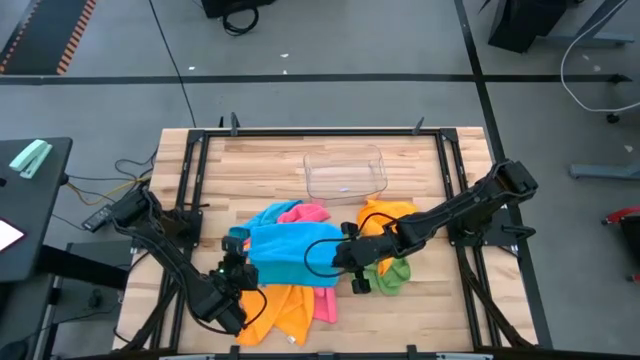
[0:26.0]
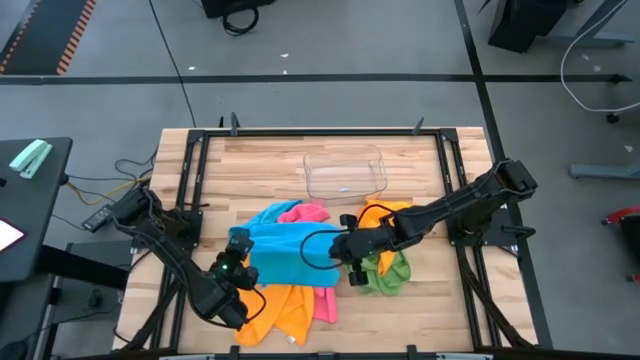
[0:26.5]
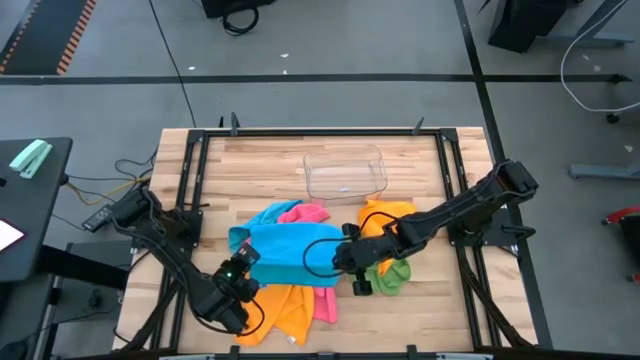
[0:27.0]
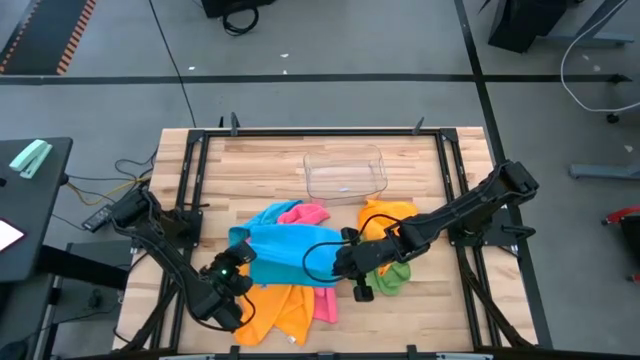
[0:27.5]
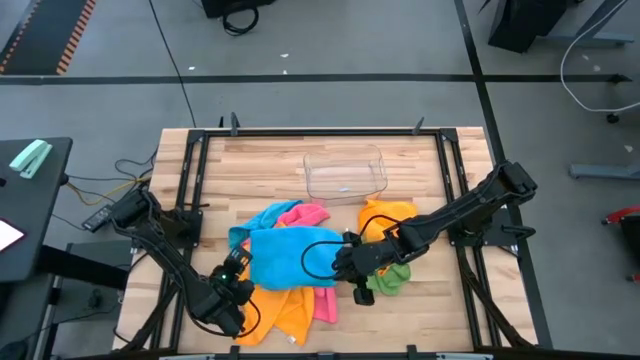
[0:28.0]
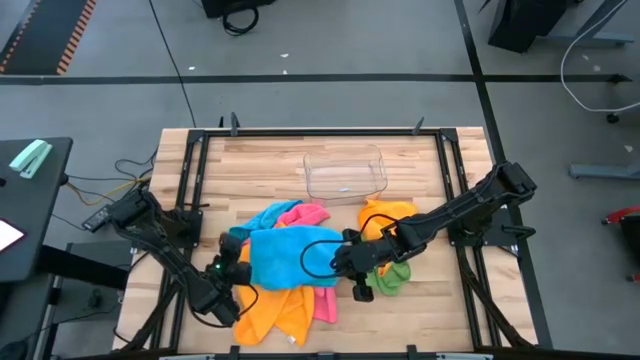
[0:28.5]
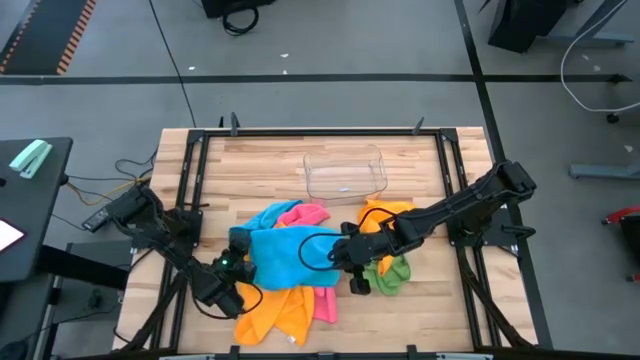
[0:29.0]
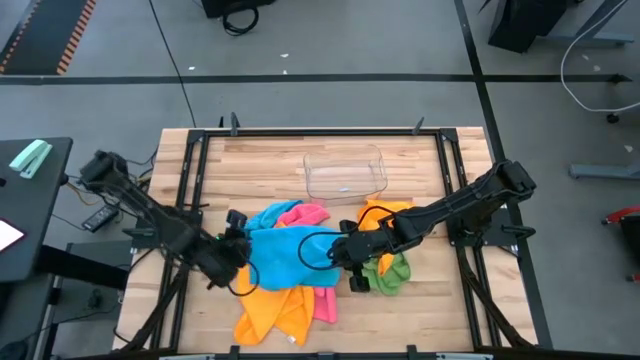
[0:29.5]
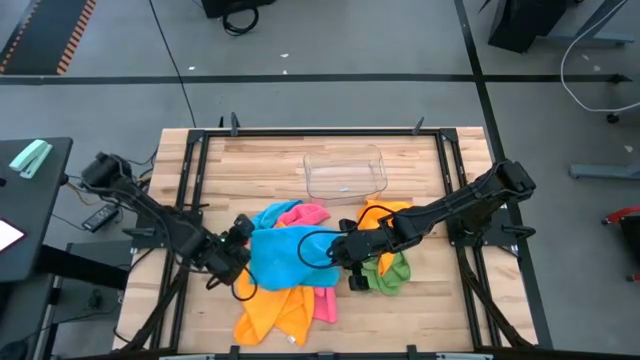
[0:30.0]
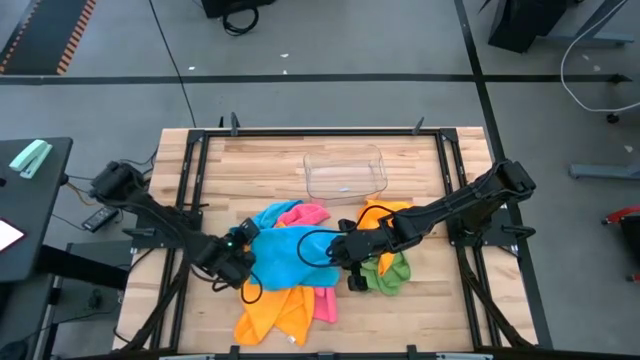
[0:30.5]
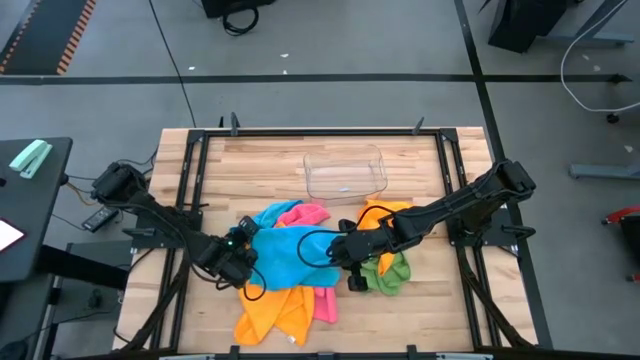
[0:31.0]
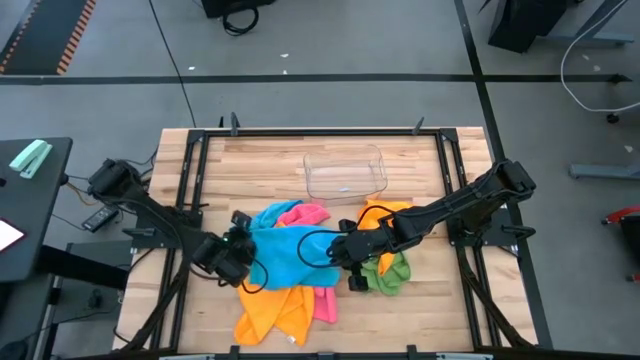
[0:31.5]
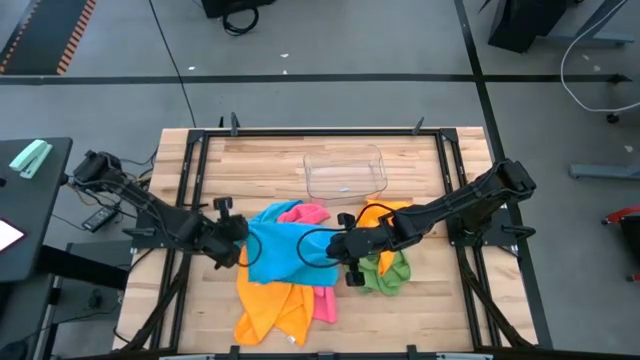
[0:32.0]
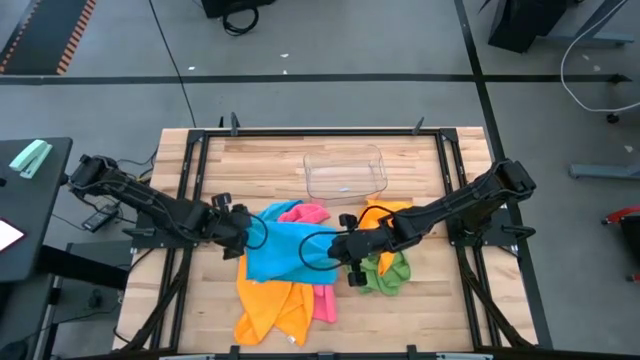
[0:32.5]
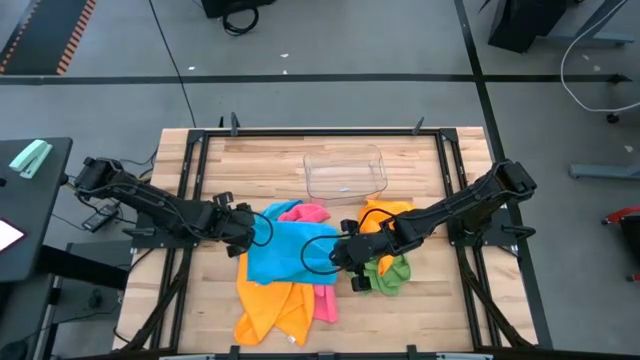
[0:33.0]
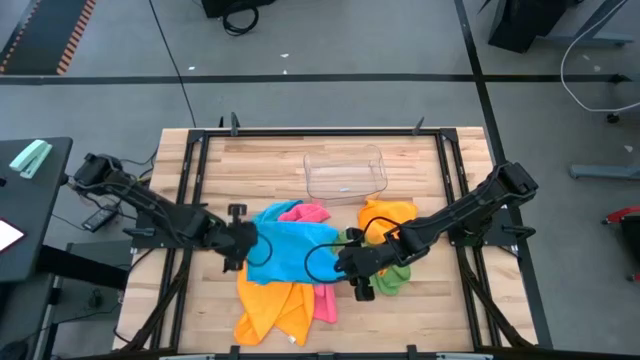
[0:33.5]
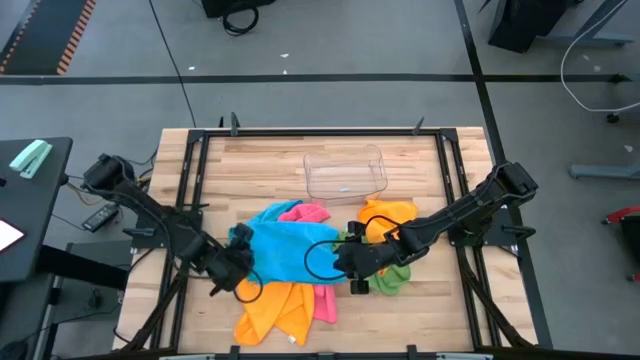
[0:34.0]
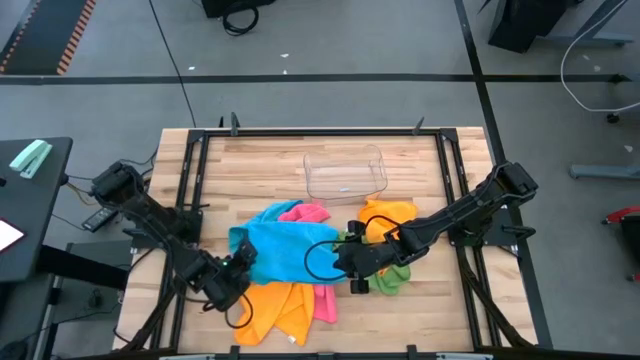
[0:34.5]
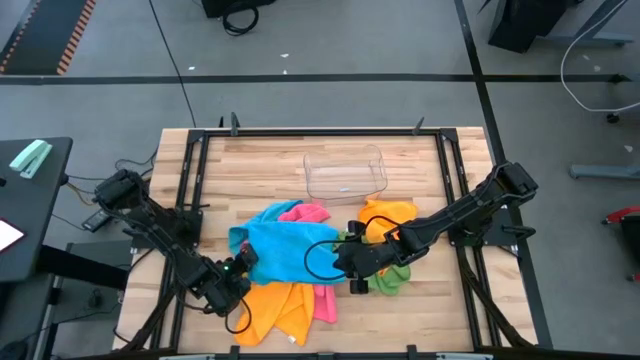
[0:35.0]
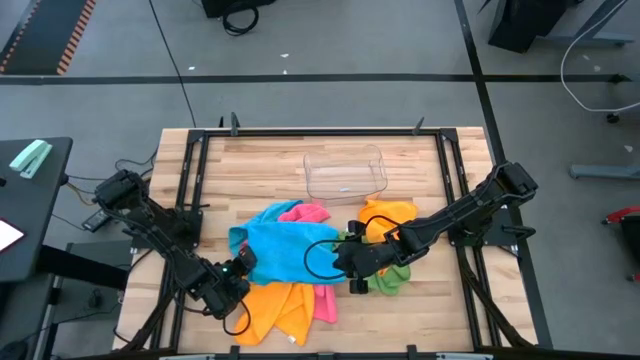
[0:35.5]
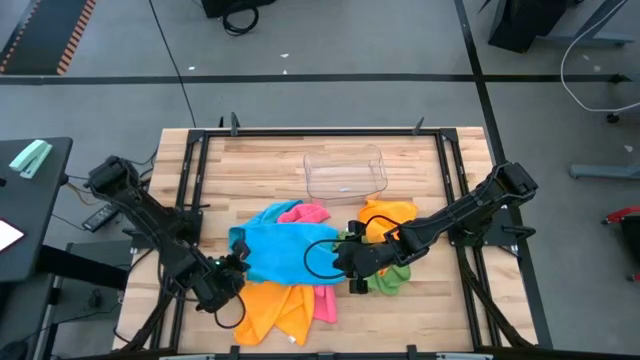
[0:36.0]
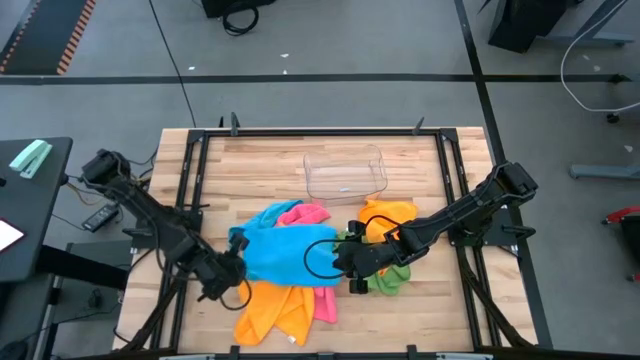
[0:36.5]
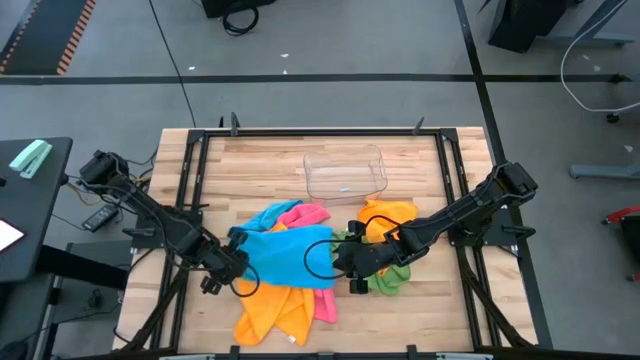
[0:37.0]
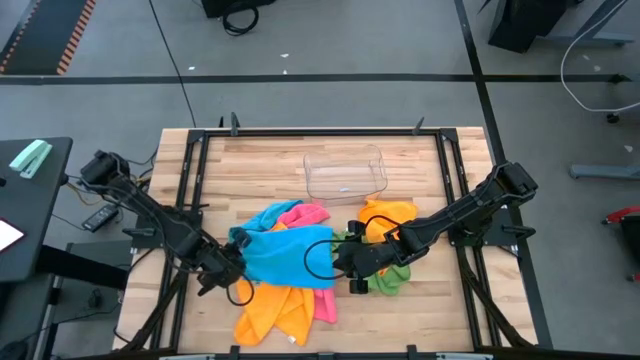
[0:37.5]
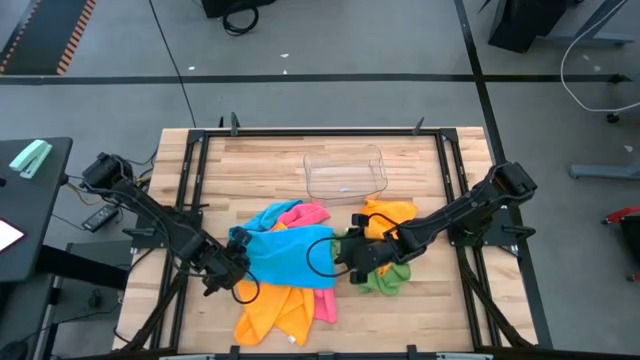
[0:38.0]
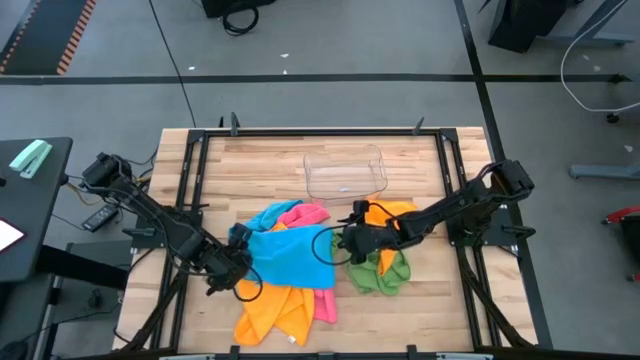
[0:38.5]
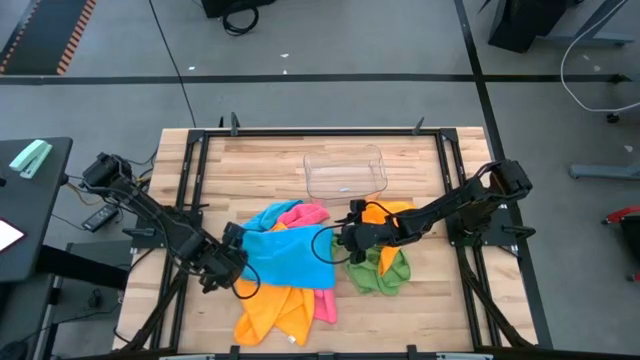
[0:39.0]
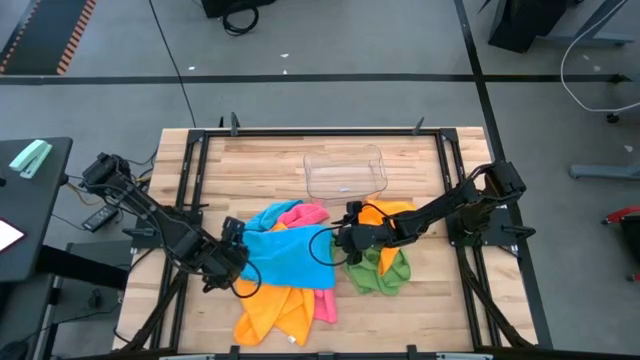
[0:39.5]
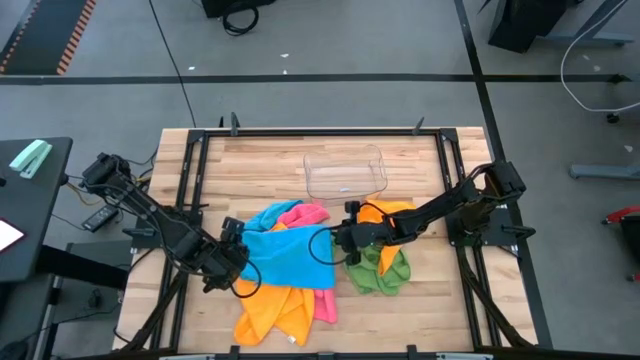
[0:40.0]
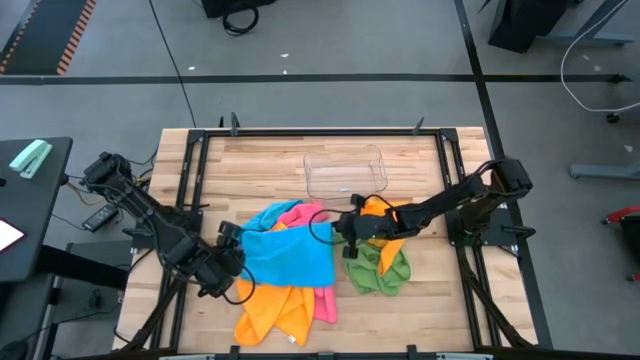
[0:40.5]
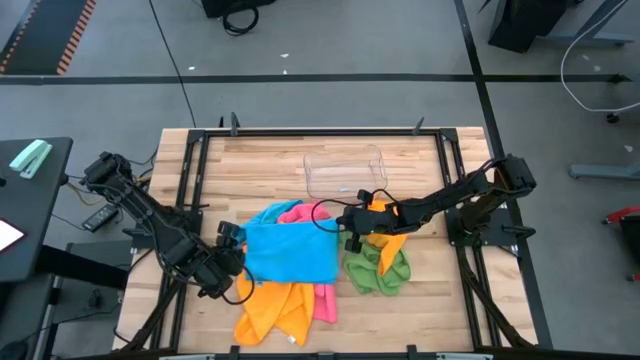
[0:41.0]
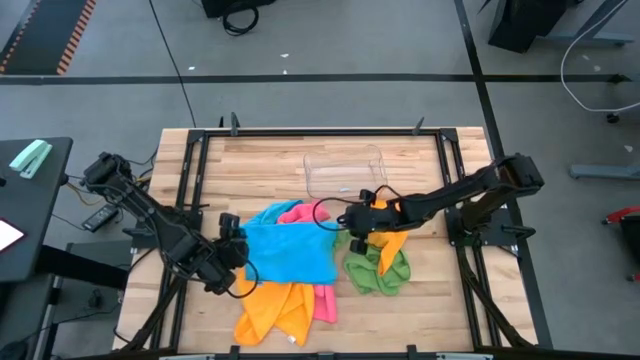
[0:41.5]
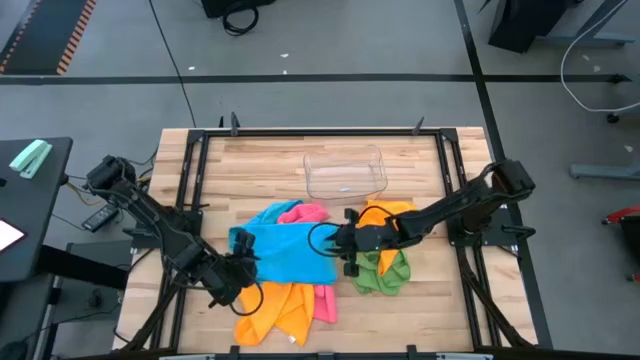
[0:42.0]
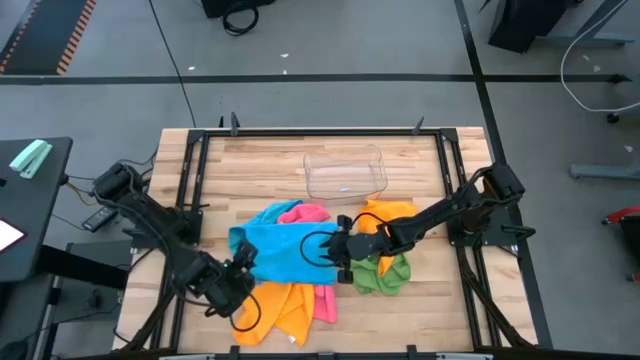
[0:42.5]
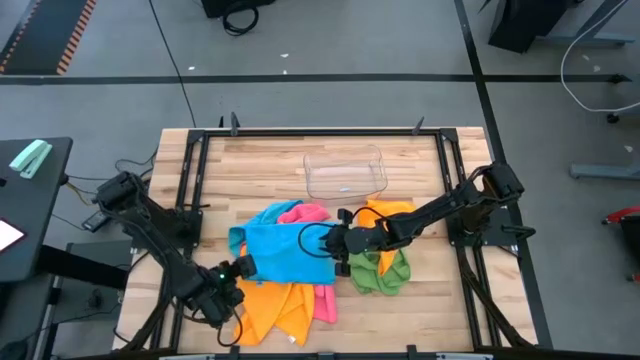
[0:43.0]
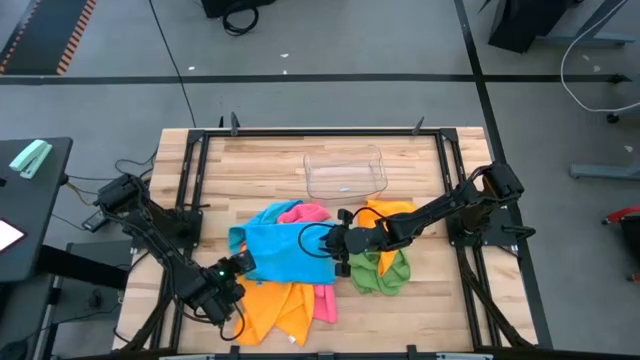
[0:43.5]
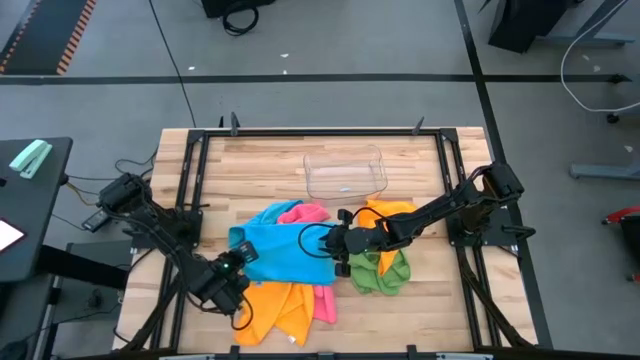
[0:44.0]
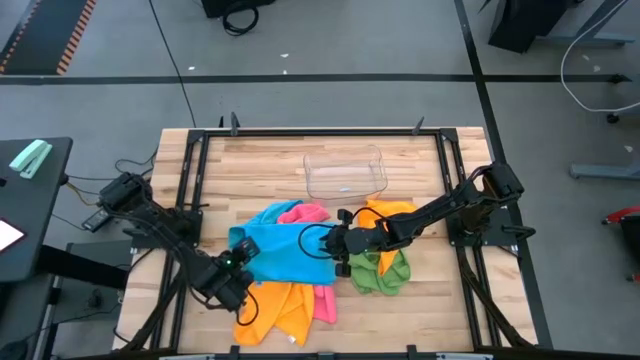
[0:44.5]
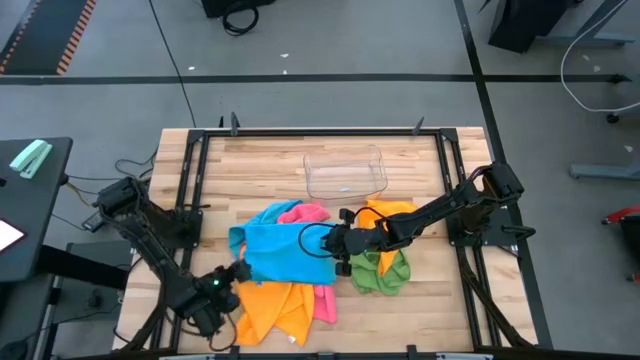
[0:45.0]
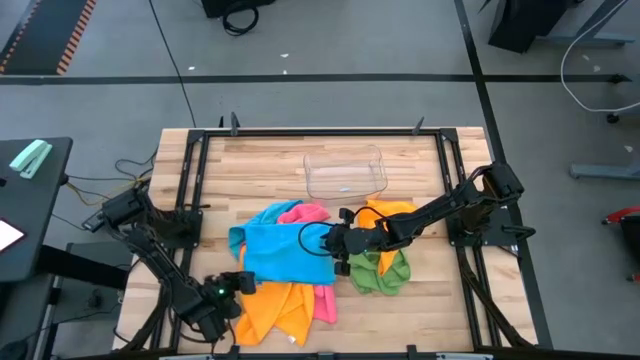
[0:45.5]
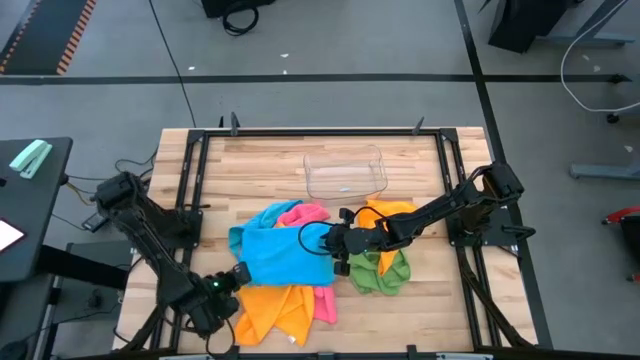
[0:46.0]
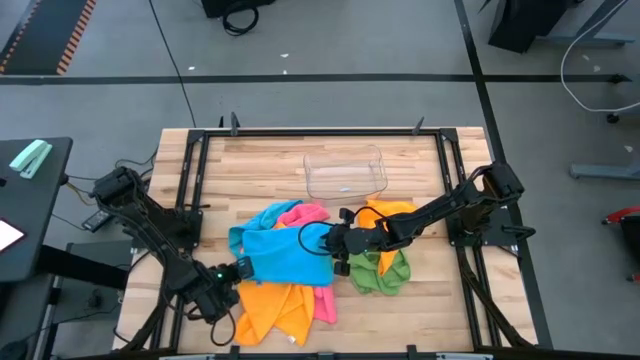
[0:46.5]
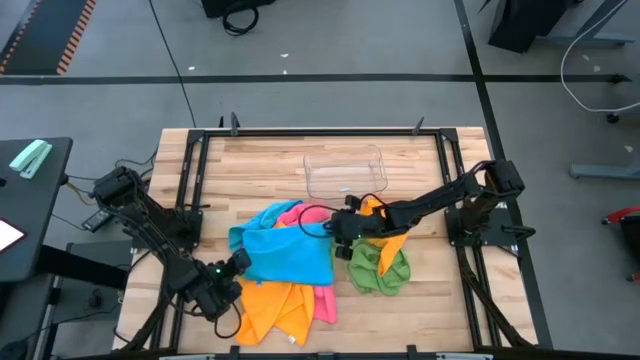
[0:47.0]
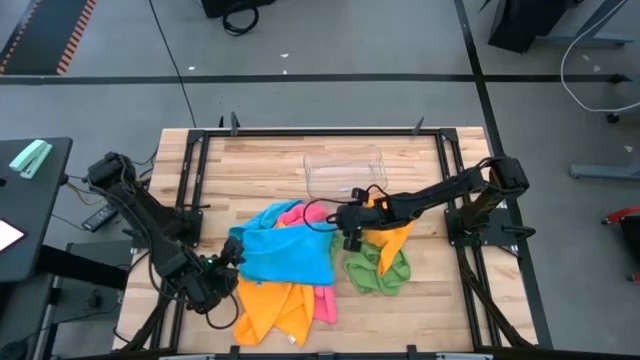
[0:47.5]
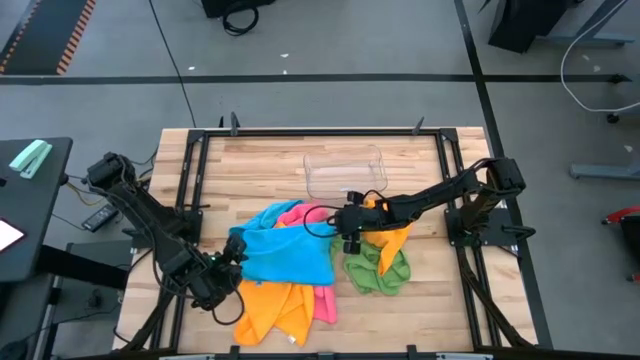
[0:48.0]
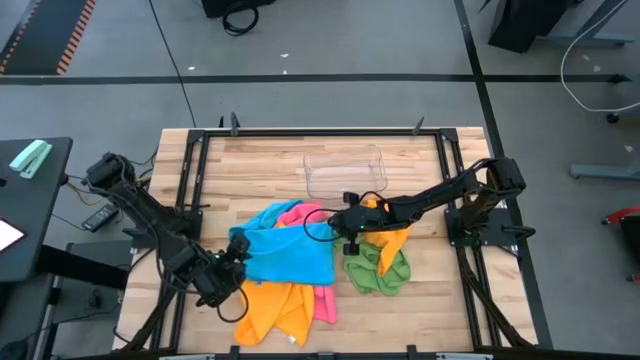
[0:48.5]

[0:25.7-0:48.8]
Task: Fold microfiber towels
Fold the bottom blue microfiber cloth
